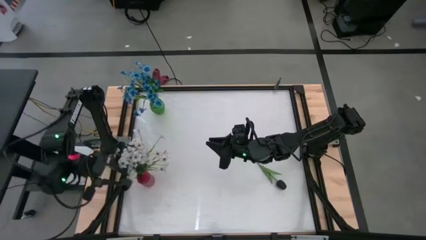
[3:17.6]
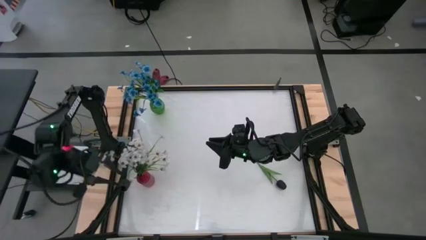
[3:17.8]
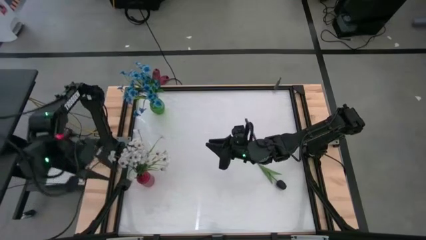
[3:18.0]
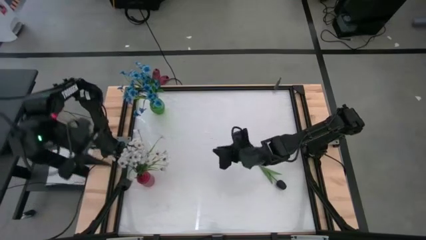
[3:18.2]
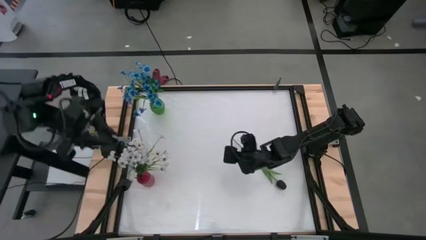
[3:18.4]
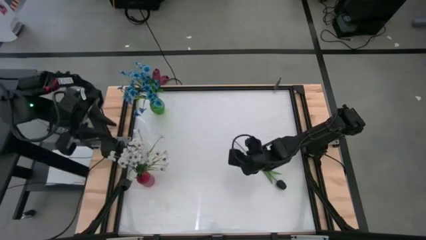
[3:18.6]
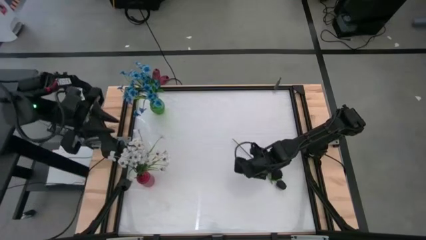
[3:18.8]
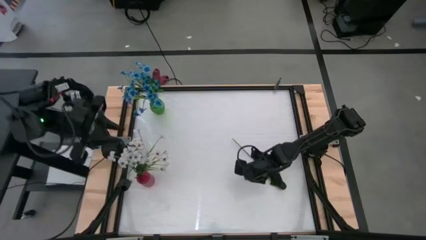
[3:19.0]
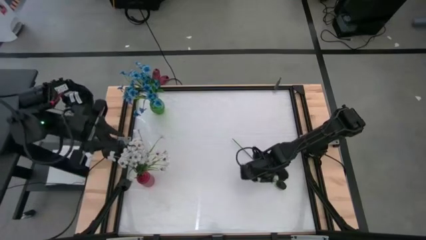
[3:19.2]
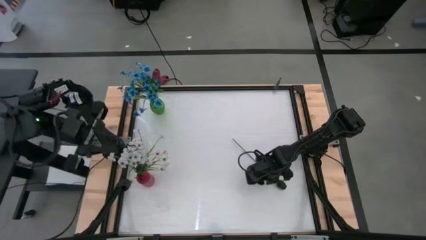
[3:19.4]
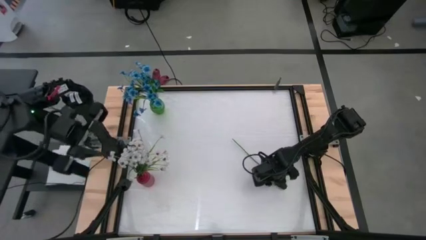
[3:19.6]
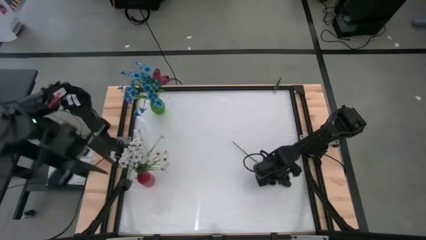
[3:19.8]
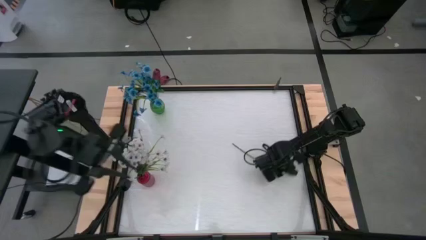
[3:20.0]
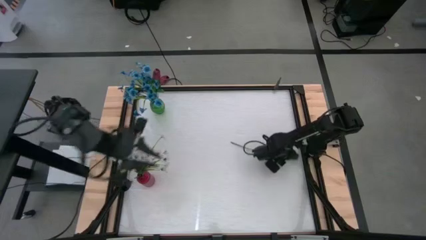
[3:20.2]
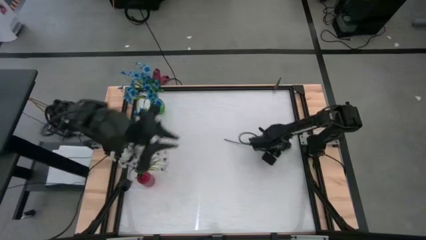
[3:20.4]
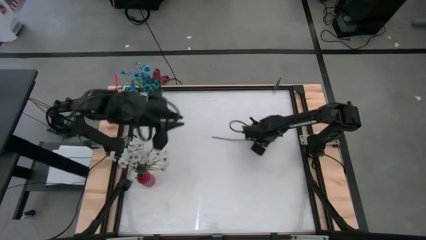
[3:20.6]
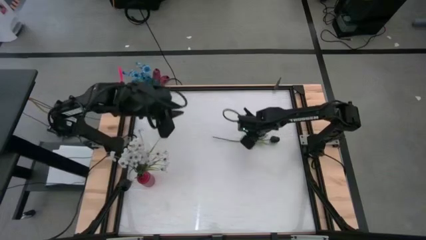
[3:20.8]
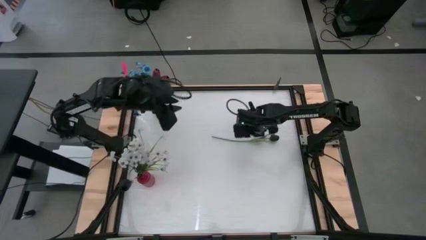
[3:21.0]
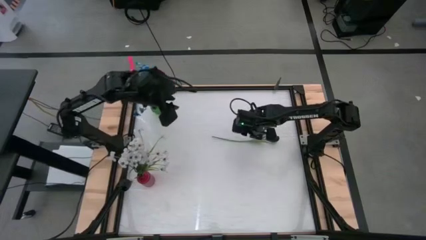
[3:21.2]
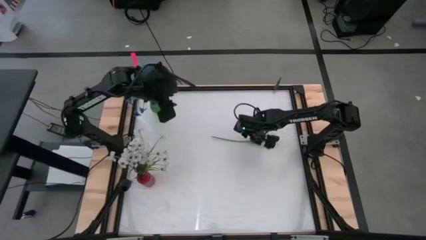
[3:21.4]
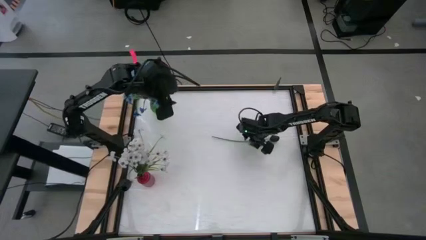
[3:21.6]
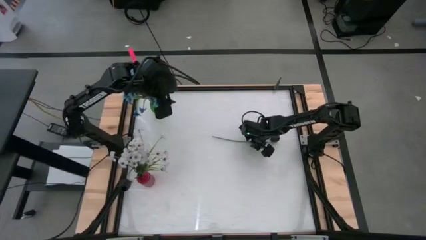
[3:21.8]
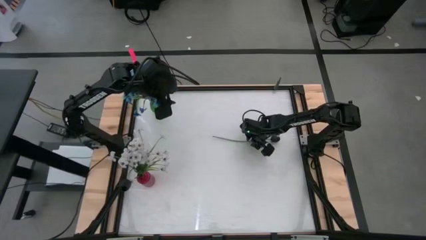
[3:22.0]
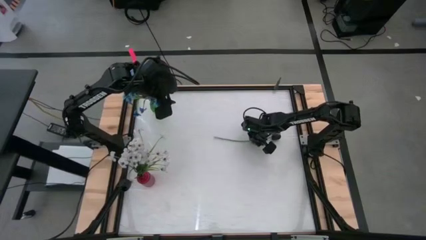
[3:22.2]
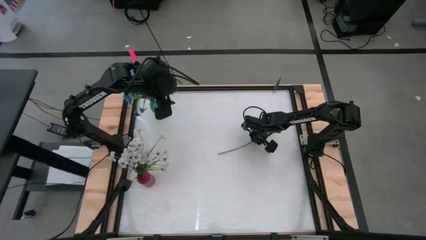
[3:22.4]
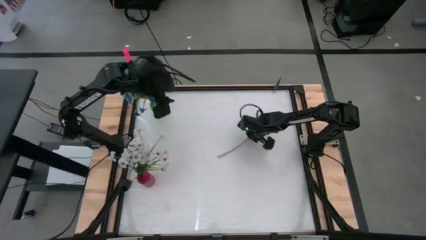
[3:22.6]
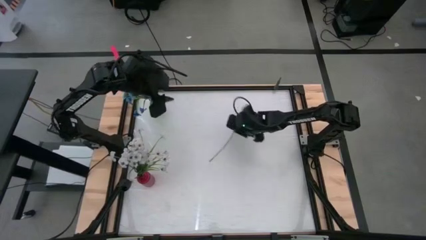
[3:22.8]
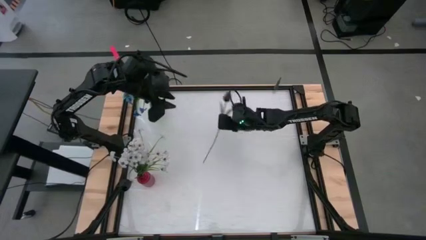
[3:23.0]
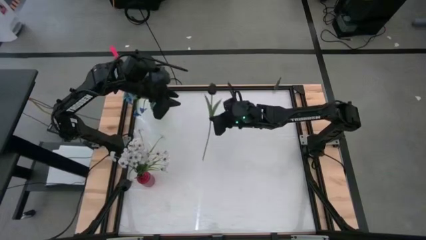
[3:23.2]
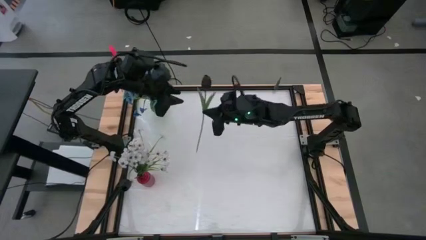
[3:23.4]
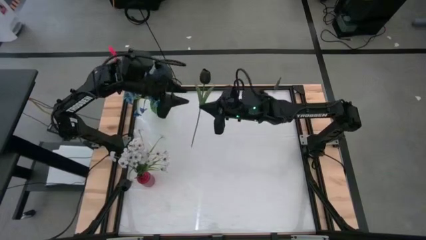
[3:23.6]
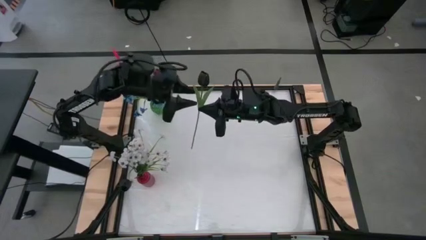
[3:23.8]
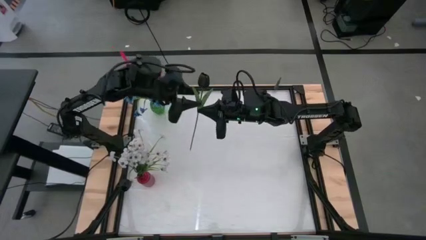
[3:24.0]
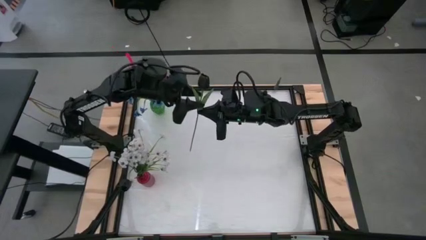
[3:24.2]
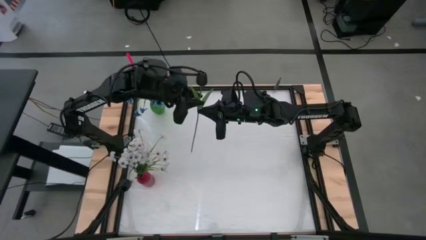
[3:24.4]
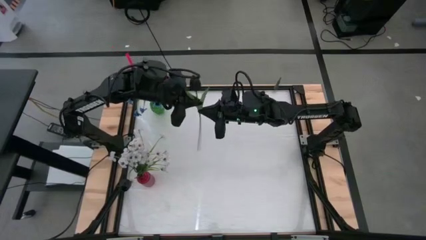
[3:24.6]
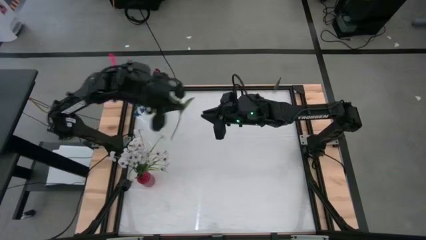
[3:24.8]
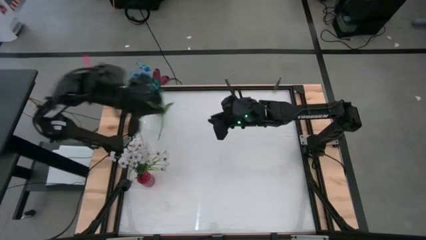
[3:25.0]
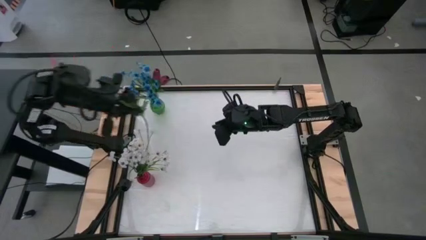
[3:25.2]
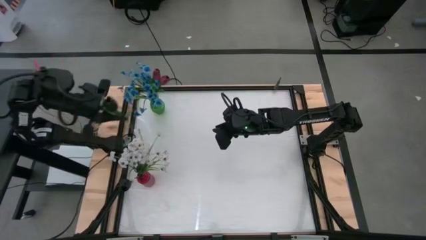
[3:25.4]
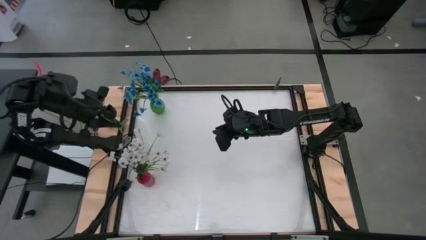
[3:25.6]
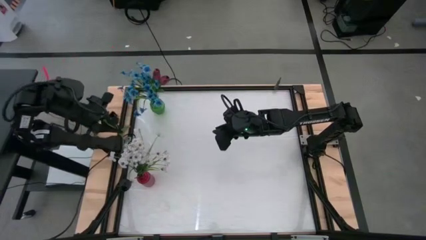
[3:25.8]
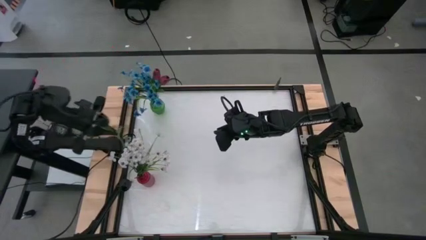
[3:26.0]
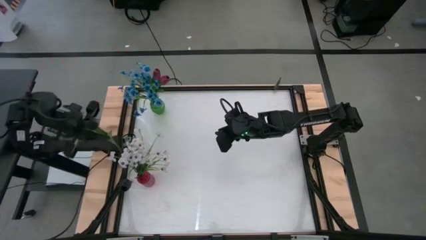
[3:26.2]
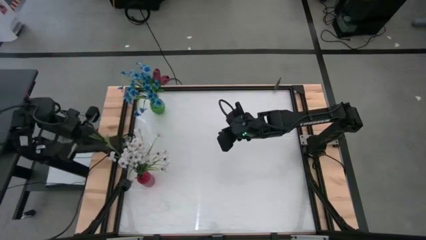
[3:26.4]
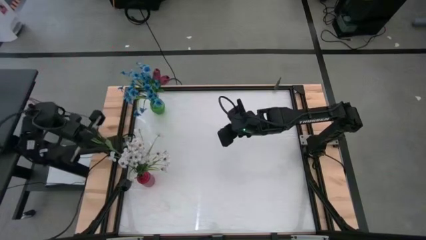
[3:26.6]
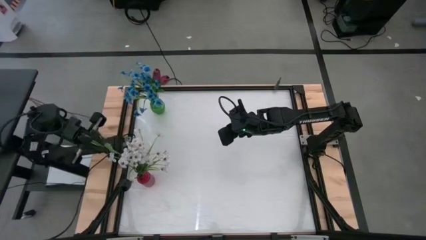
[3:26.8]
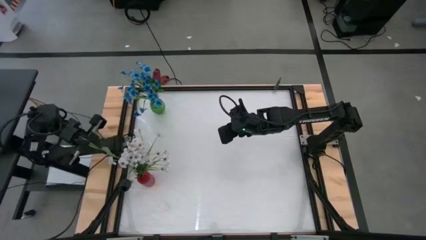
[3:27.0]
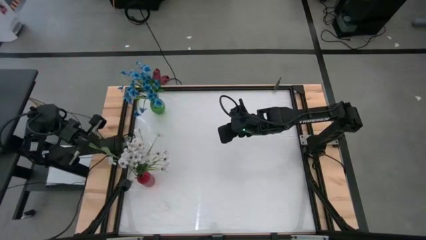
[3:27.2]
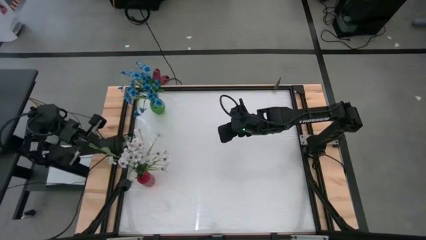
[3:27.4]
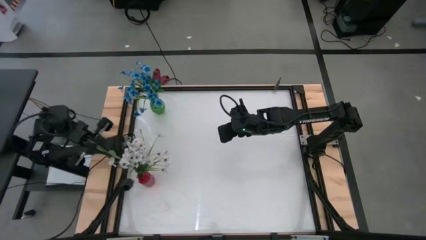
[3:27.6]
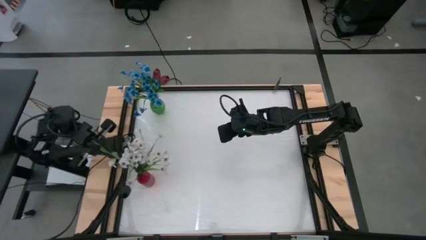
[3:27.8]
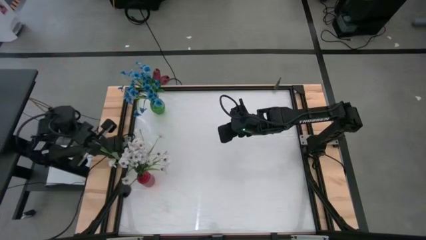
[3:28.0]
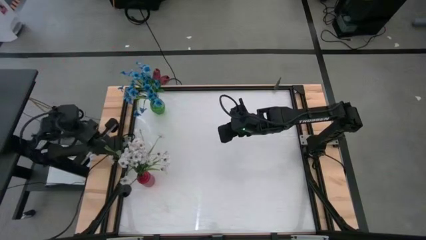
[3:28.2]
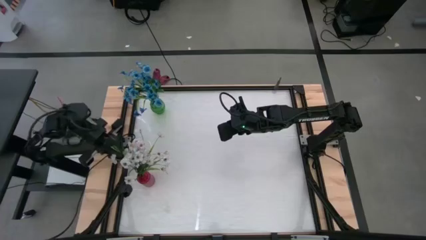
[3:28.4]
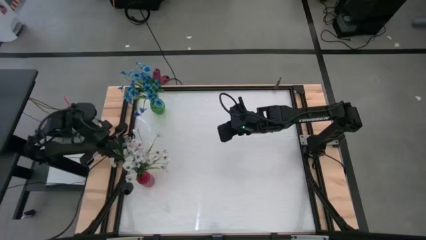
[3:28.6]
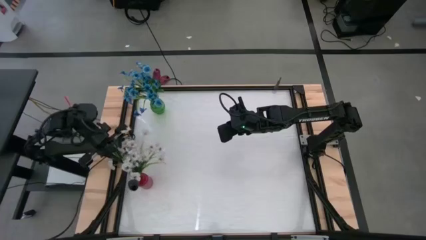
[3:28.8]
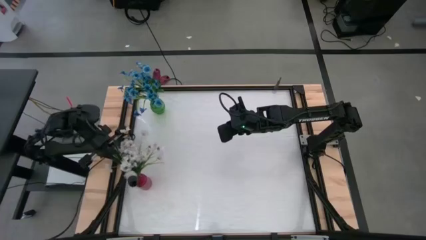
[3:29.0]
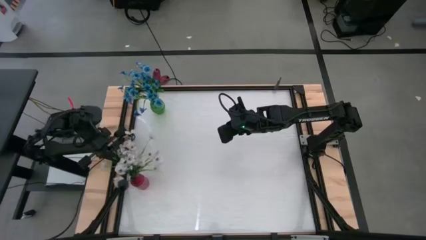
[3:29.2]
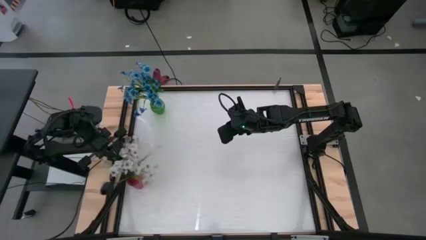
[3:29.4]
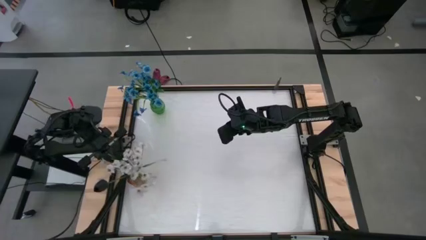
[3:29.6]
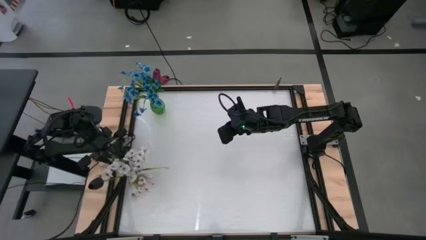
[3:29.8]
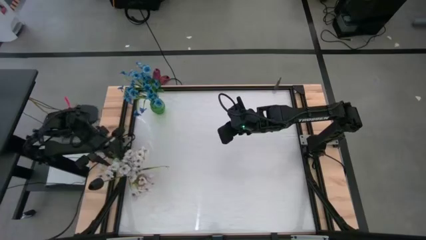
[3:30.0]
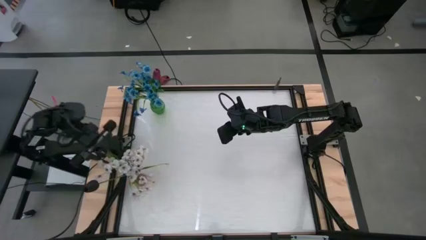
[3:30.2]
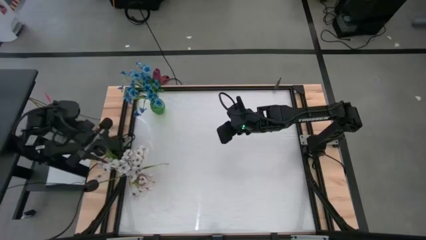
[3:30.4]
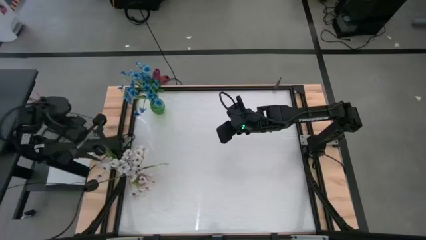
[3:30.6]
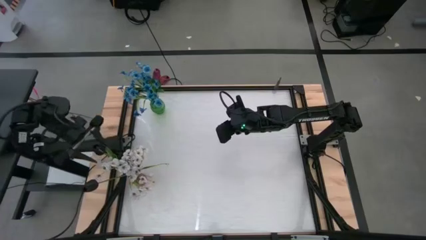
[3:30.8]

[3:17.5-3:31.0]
Task: Sort flowers into vase by color
Put the black tulip into the red vase

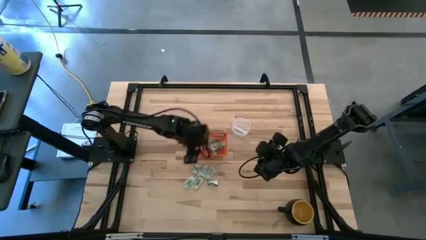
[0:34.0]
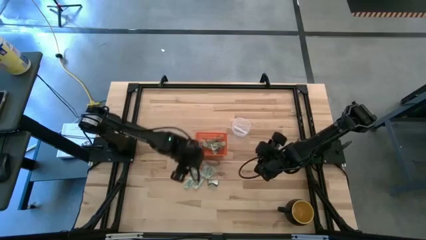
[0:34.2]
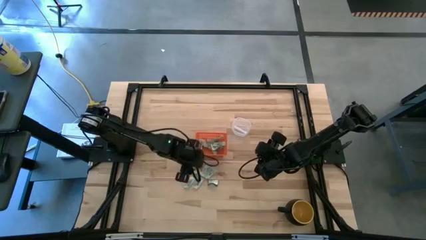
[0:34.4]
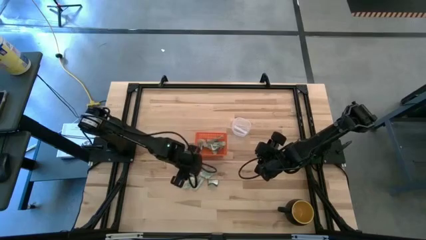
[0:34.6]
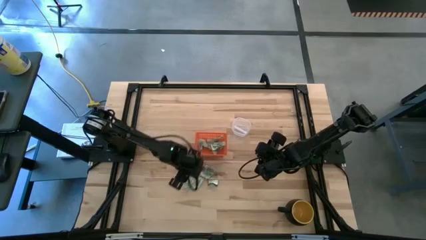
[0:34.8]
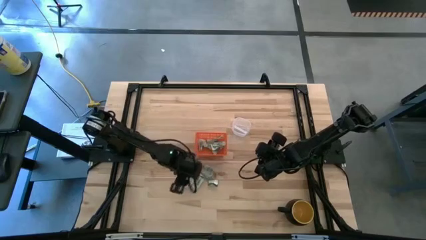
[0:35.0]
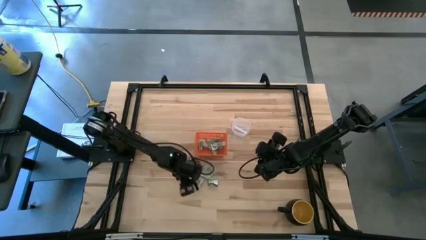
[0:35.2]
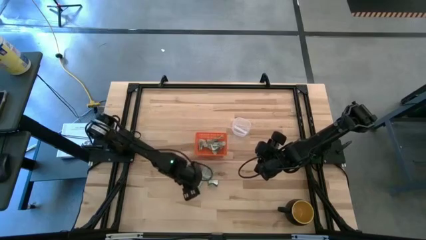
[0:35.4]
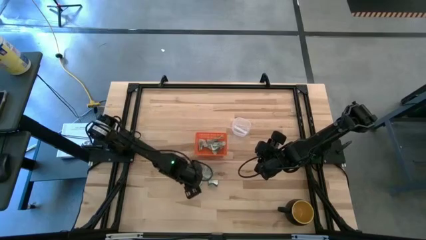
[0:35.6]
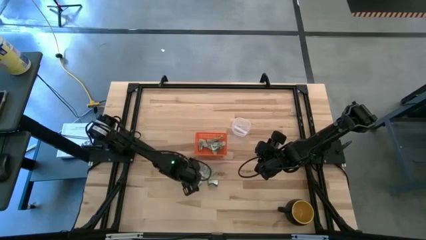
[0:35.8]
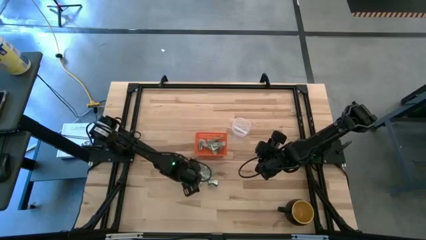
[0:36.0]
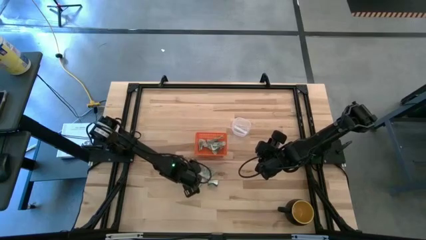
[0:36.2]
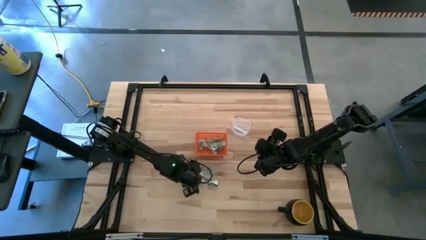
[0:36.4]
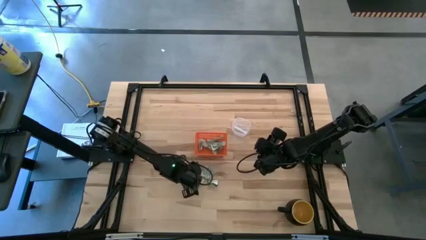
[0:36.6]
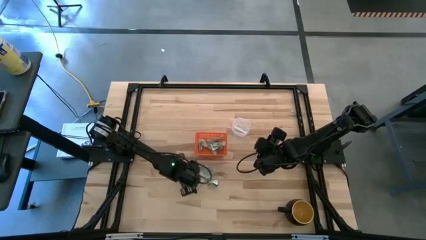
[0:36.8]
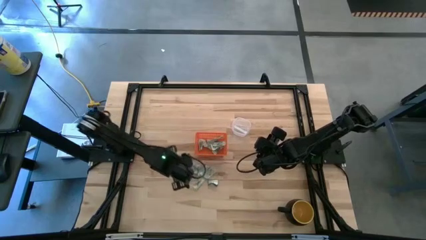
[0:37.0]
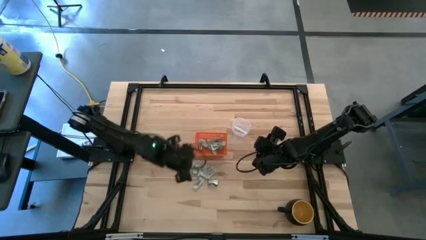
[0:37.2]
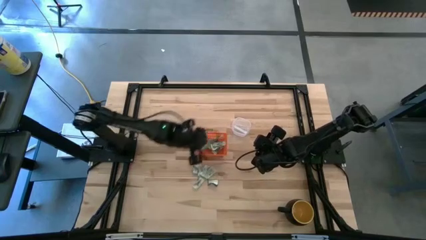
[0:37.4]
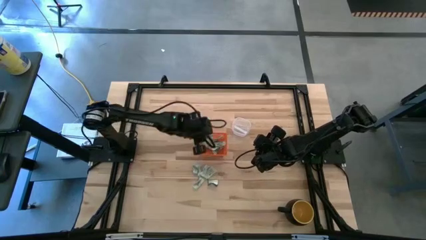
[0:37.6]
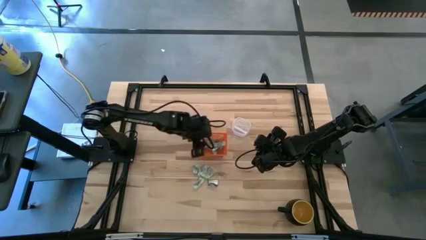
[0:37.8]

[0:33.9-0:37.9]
Task: Pick and place Stevia / Truvia into bins
Put the stevia packet into the basket
